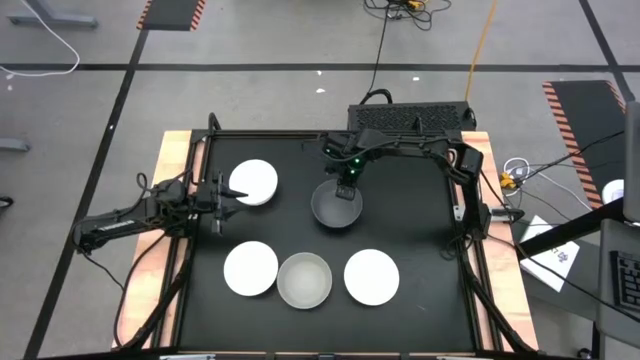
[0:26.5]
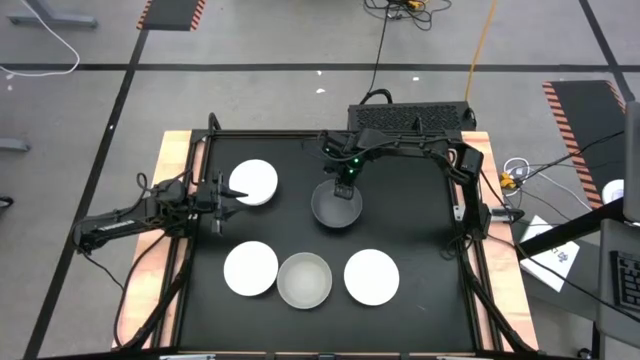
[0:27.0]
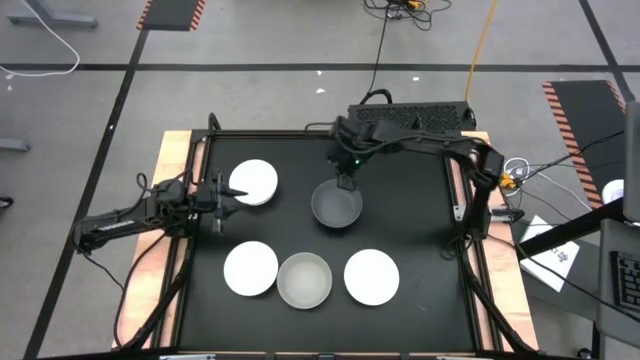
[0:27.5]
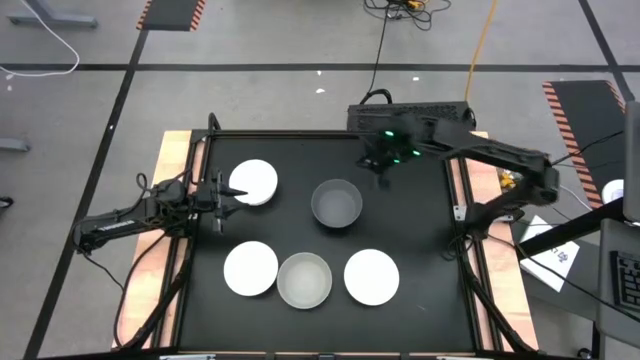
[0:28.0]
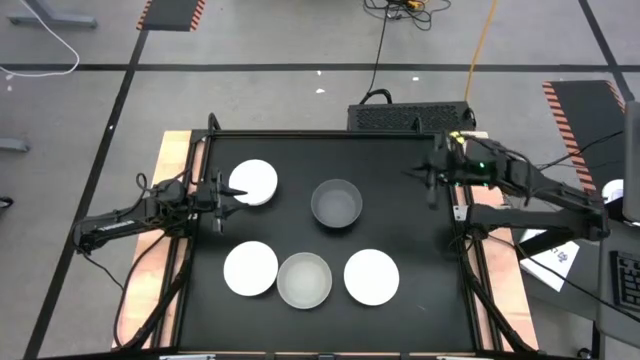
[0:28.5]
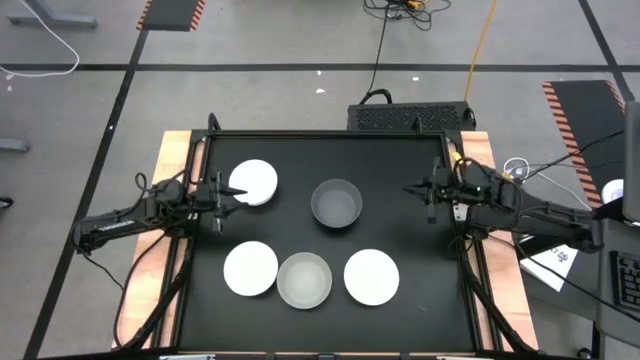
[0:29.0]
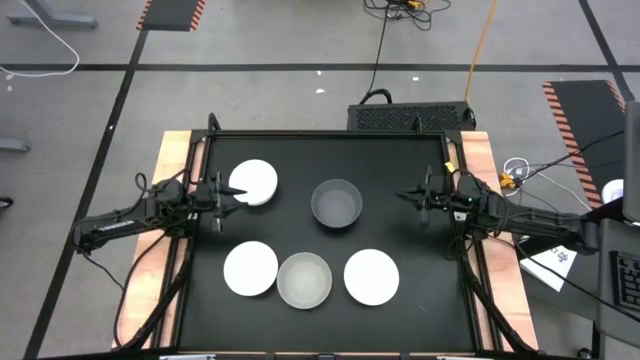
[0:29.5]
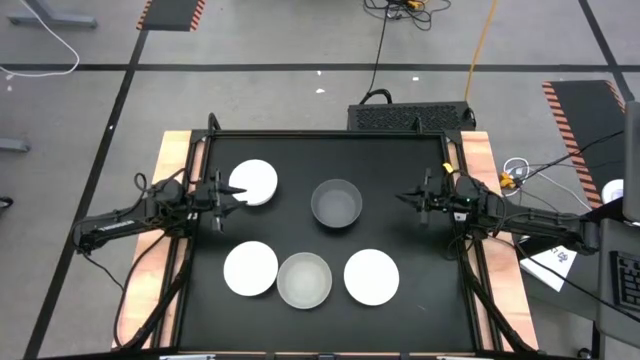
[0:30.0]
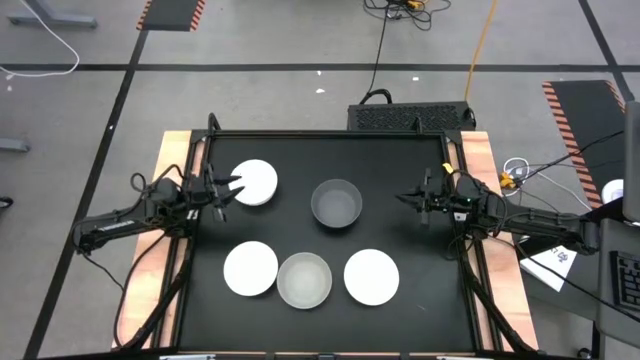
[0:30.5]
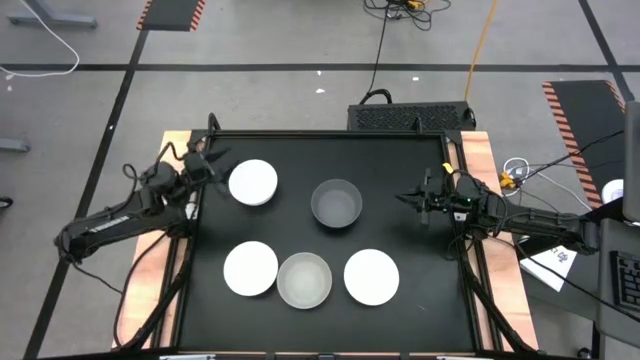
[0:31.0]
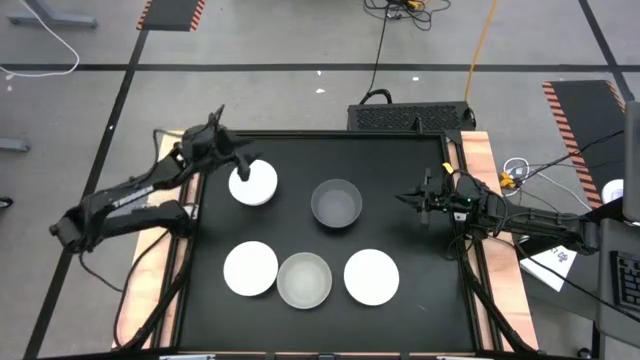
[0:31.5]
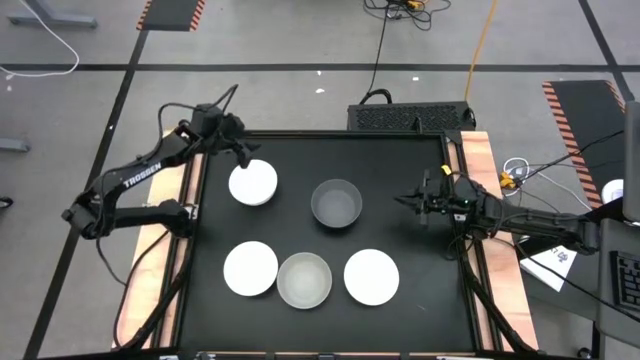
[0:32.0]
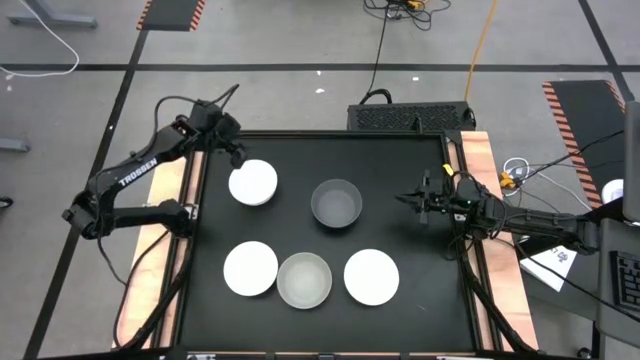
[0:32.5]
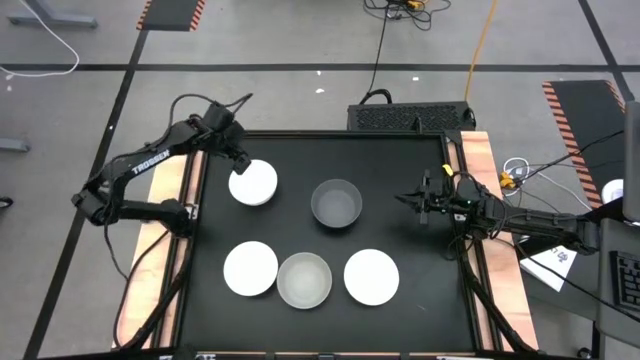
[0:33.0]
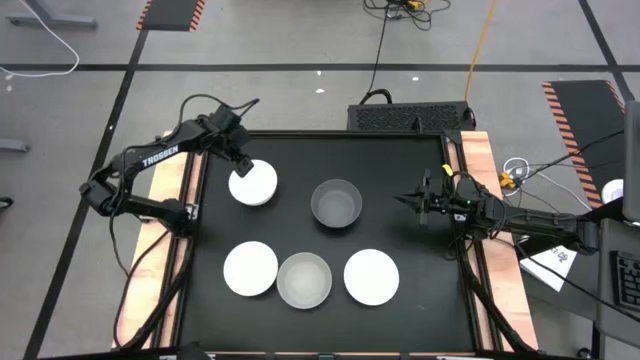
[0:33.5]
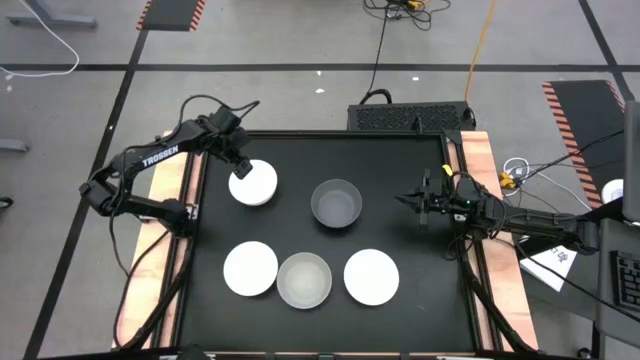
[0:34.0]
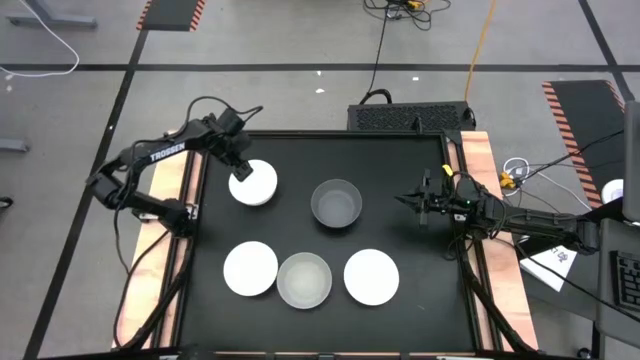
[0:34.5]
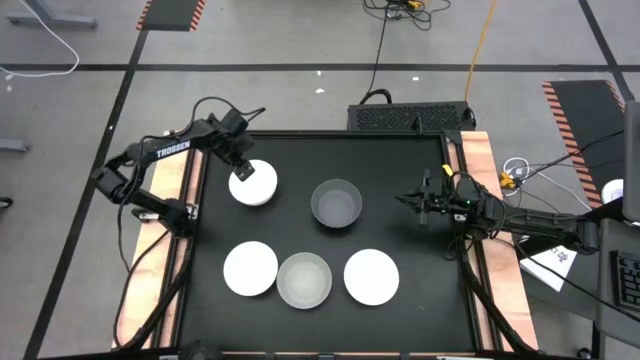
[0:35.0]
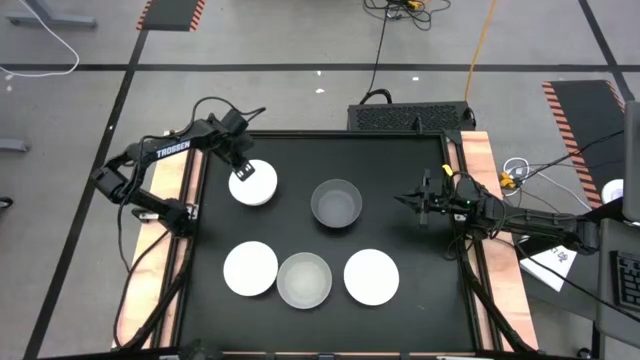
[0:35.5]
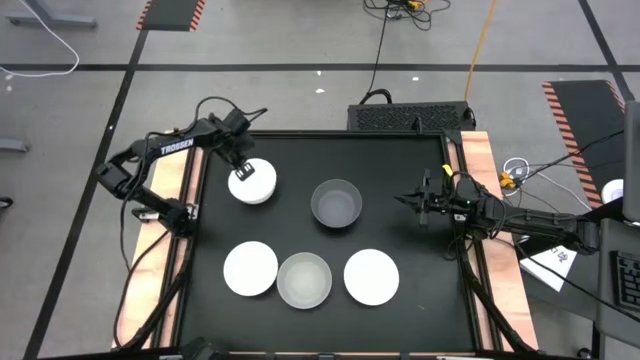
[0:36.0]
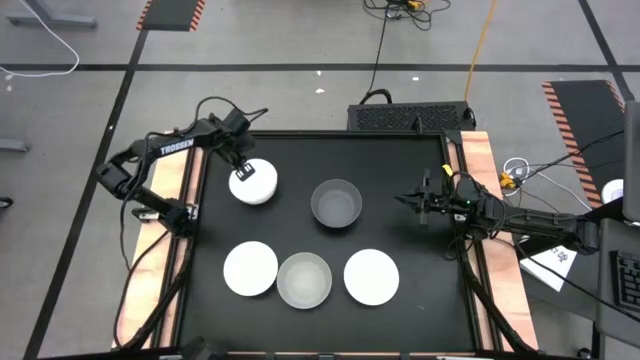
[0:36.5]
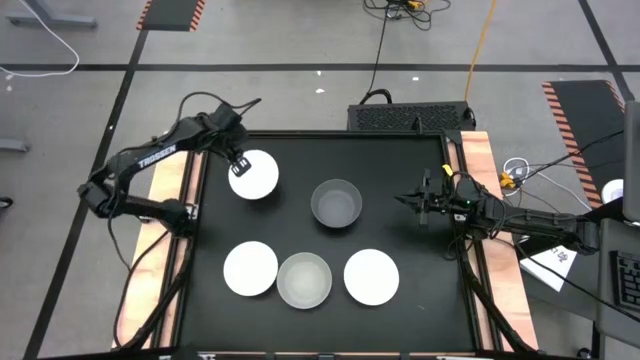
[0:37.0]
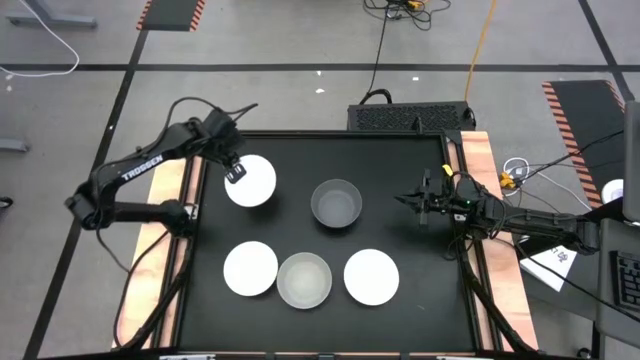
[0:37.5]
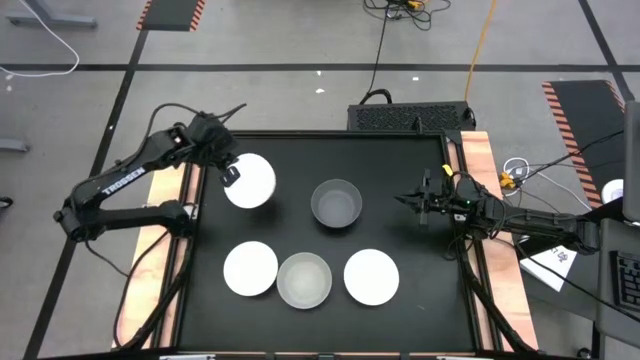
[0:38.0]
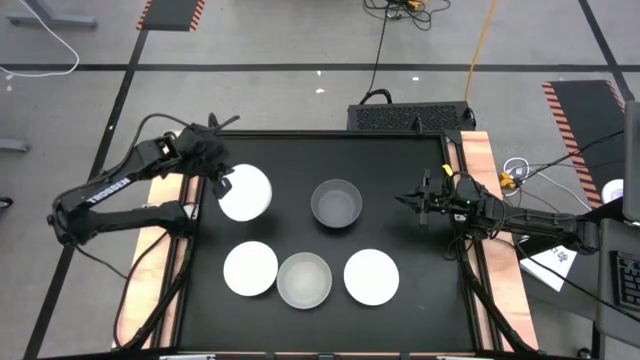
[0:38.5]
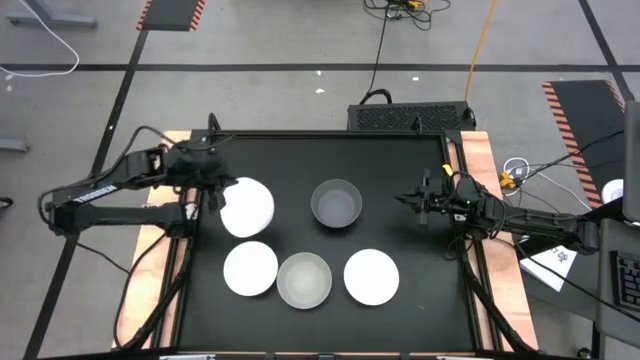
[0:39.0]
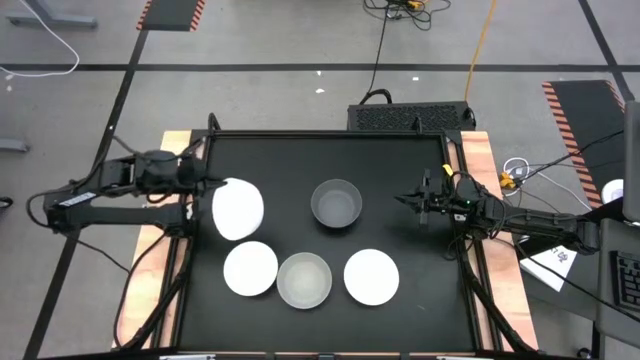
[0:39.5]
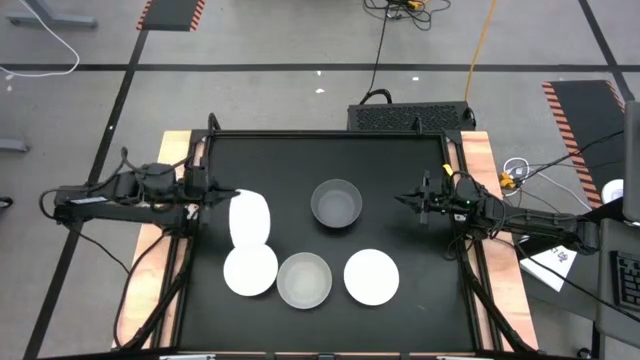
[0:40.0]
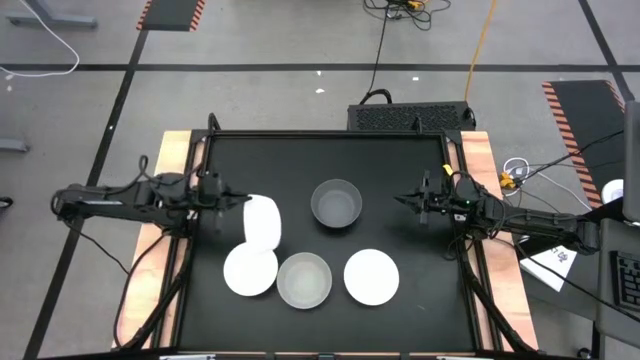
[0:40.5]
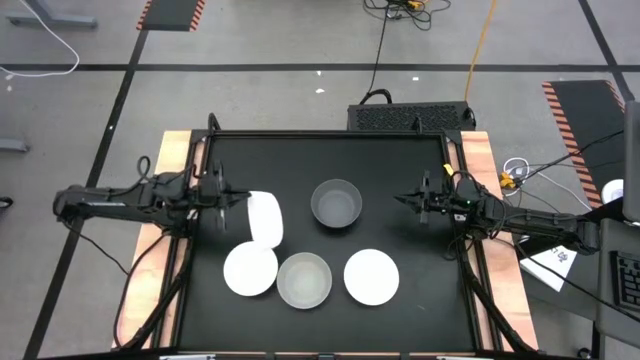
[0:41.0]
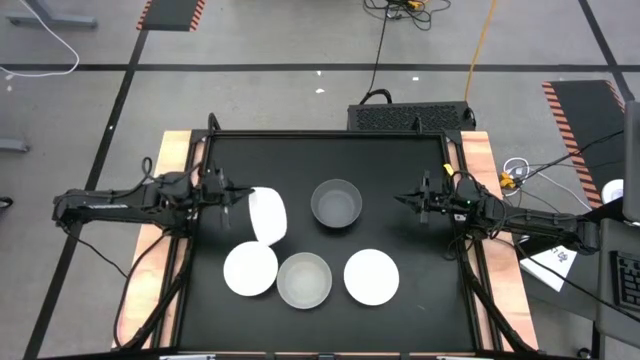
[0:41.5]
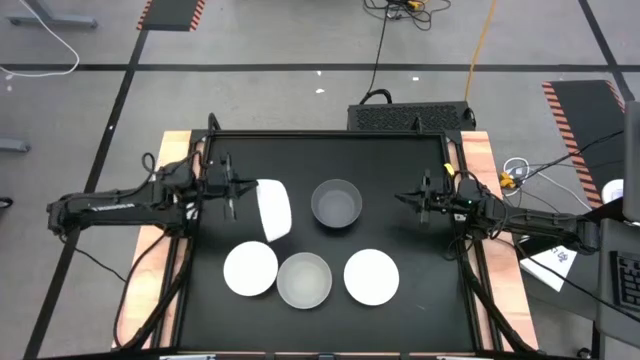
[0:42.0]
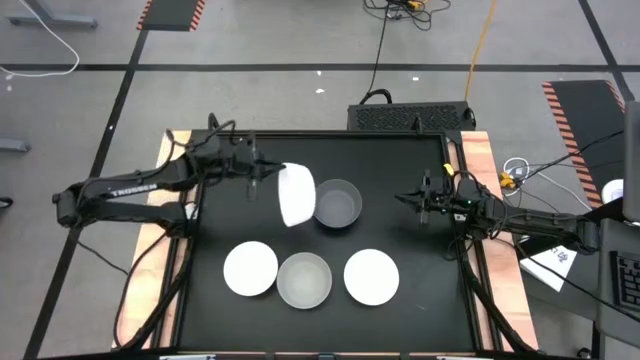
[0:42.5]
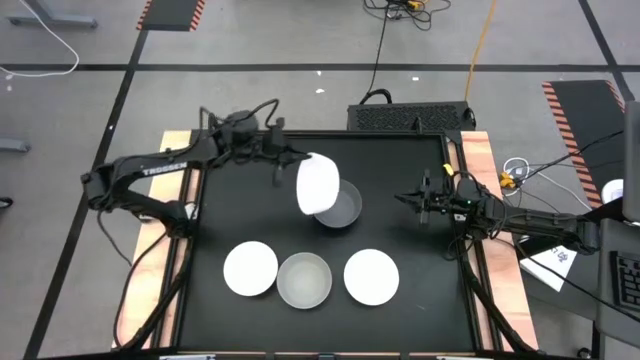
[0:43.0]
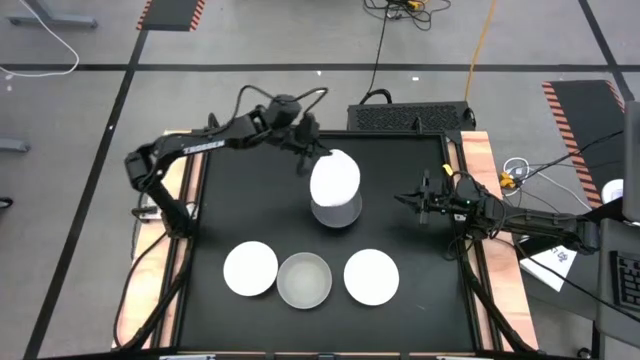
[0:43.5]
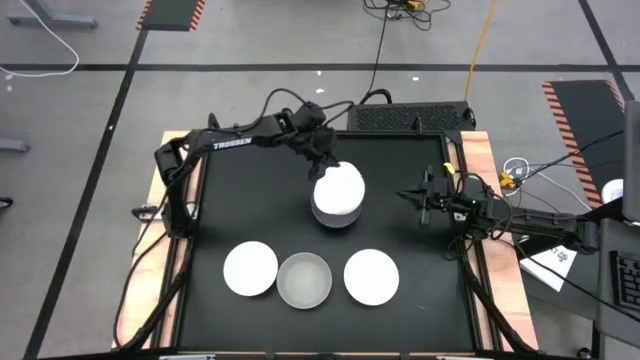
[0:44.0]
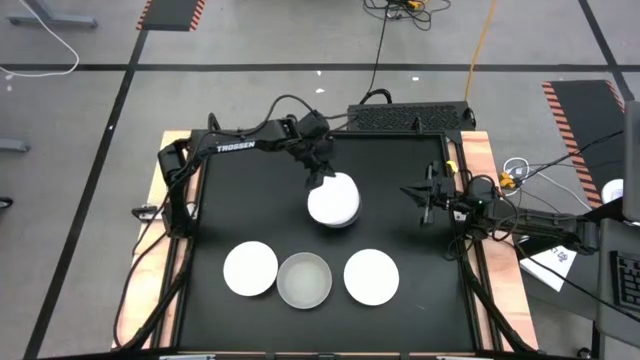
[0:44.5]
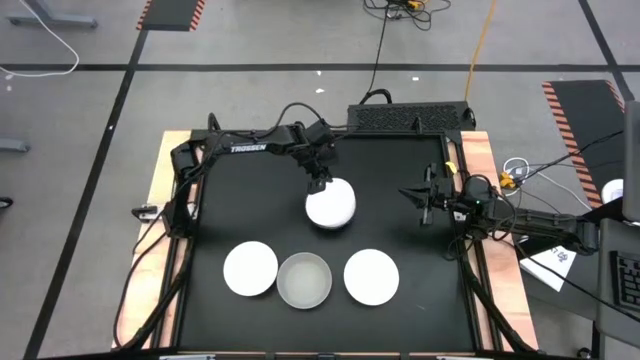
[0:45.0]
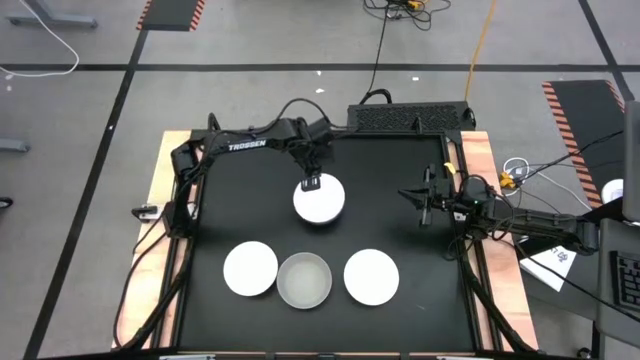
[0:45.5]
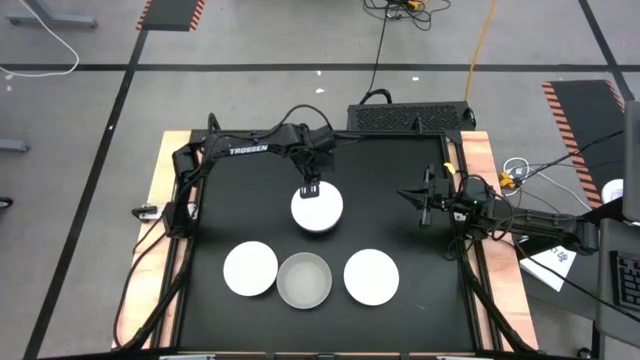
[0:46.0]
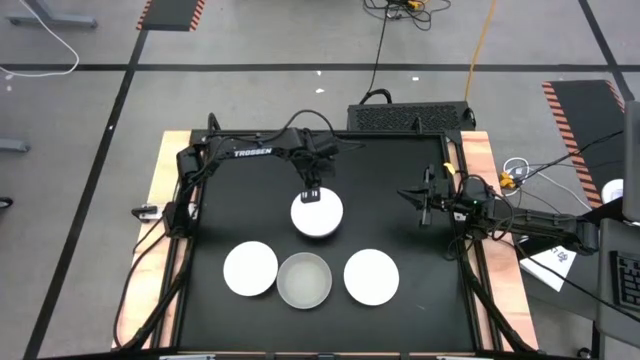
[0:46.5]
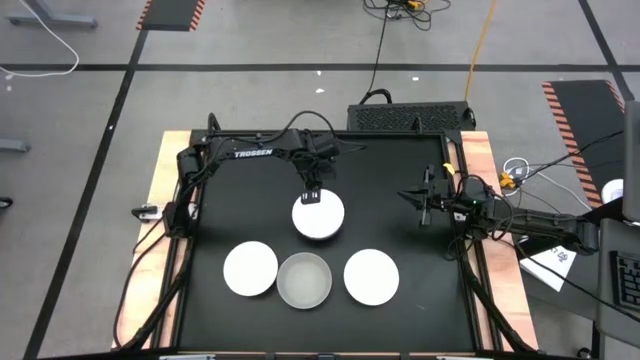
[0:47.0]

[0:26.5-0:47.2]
Task: Nest bowls inside each other
Stack the top white bowl on the gray bowl

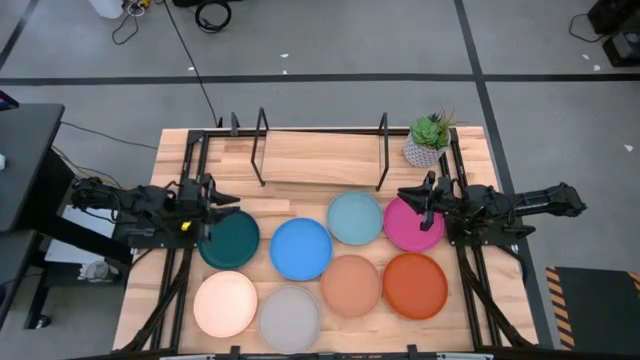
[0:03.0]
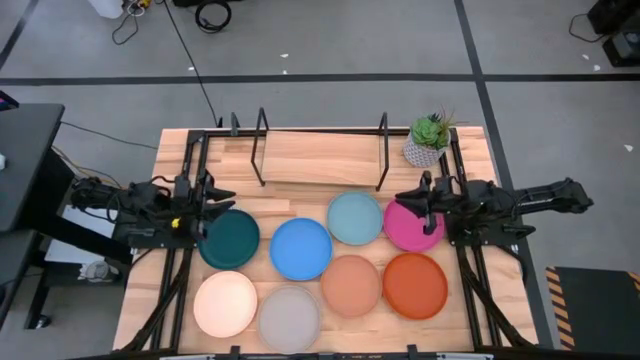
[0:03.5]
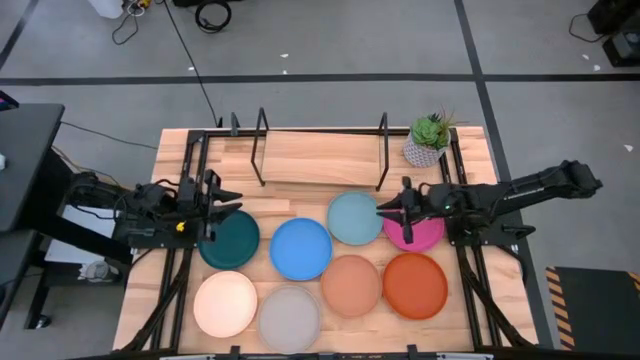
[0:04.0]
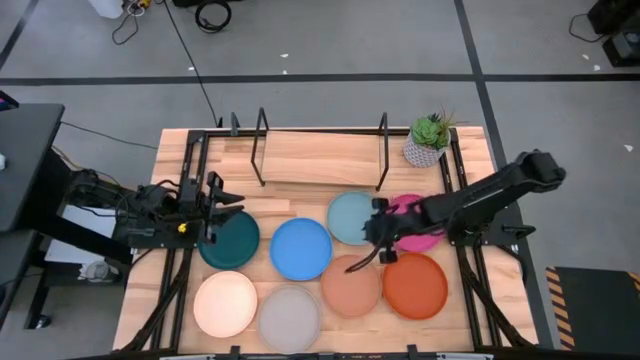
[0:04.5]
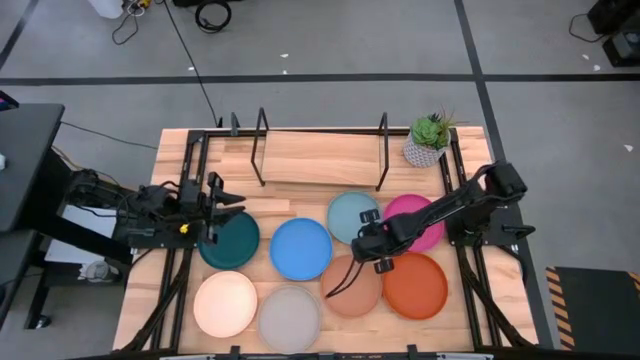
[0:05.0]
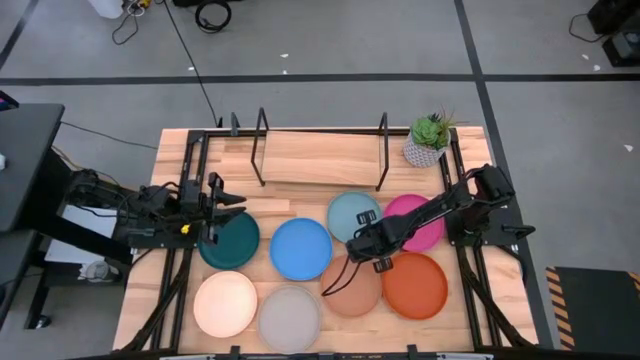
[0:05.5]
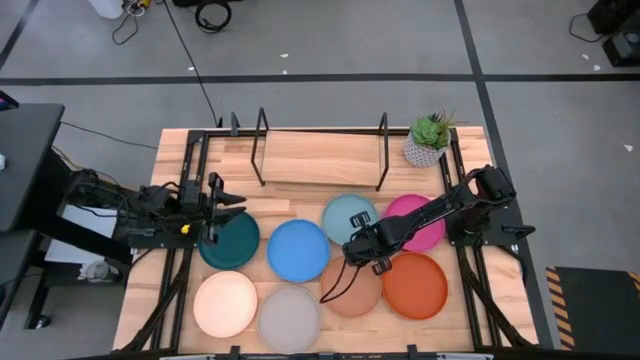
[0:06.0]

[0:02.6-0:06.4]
Task: Place and stack plates onto a shelf
Put the light blue plate on the shelf
